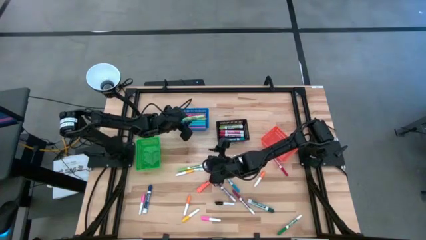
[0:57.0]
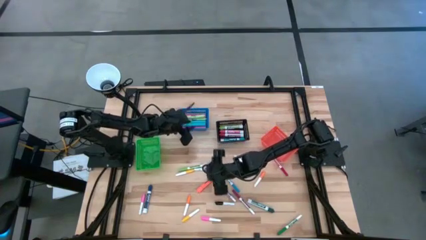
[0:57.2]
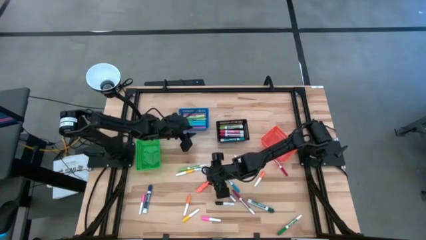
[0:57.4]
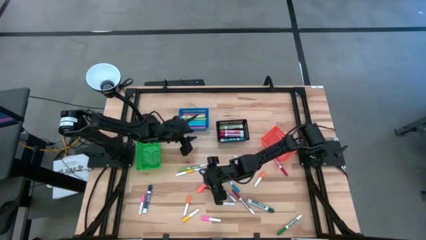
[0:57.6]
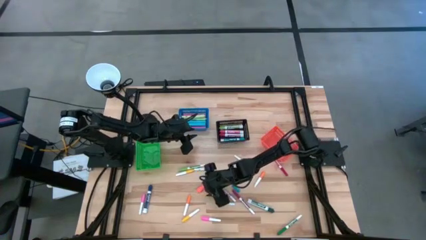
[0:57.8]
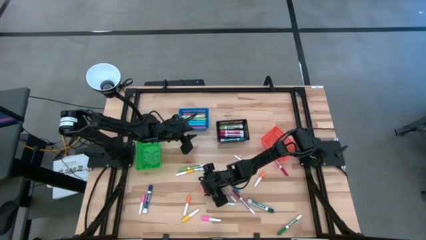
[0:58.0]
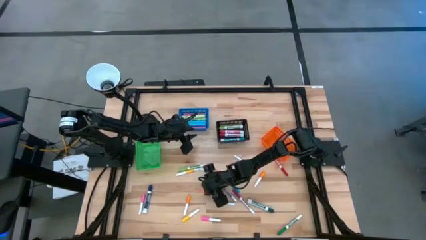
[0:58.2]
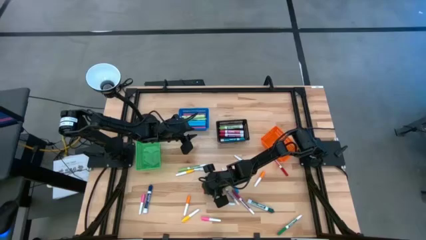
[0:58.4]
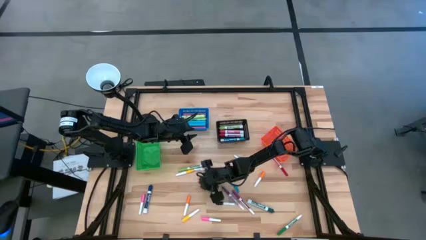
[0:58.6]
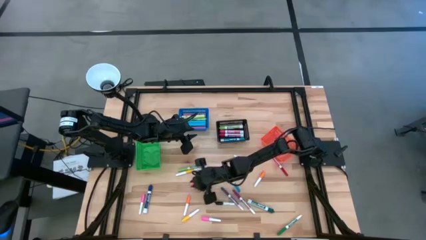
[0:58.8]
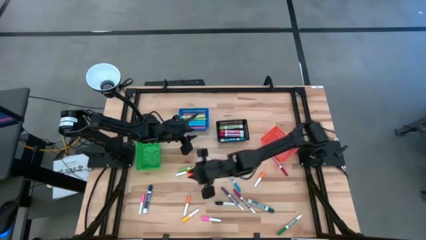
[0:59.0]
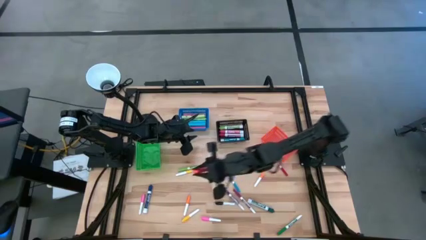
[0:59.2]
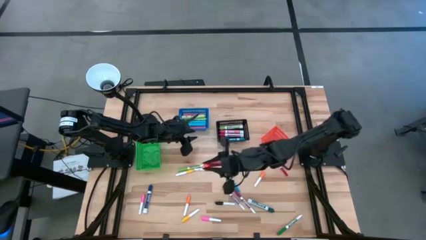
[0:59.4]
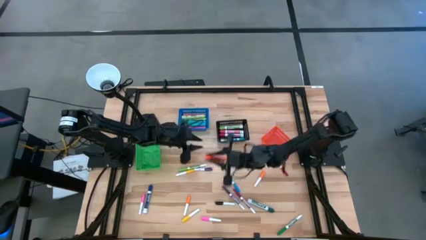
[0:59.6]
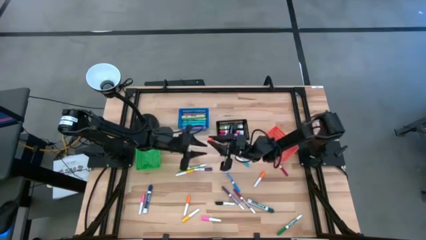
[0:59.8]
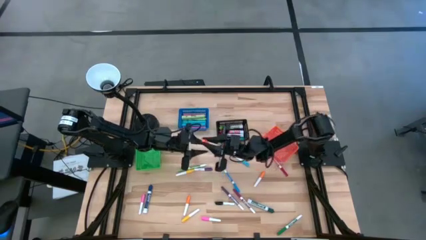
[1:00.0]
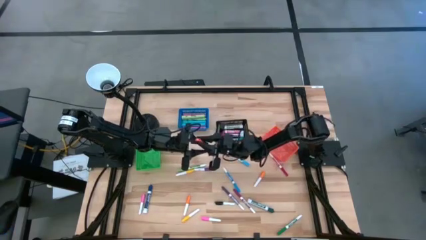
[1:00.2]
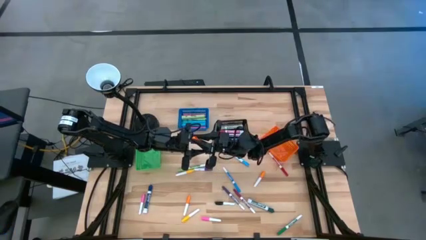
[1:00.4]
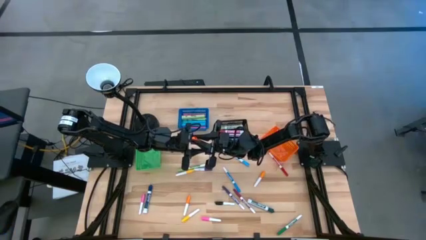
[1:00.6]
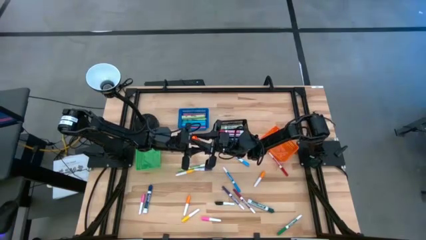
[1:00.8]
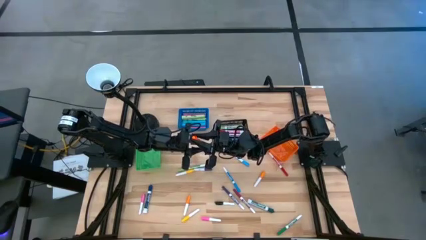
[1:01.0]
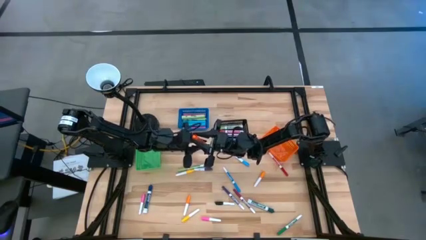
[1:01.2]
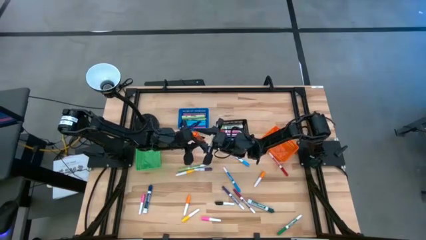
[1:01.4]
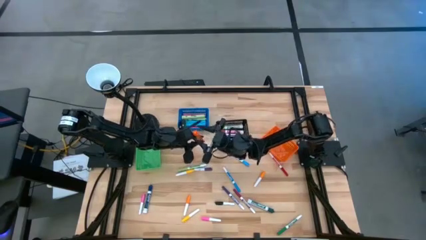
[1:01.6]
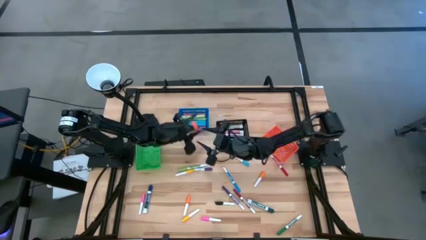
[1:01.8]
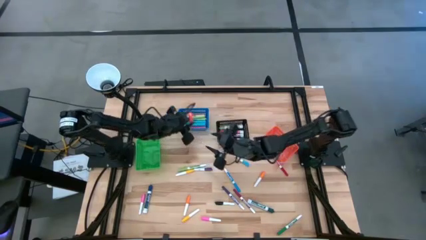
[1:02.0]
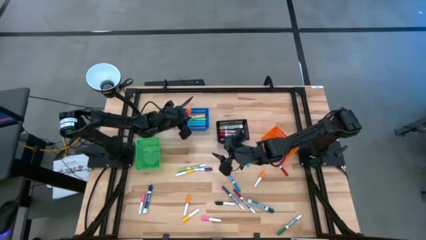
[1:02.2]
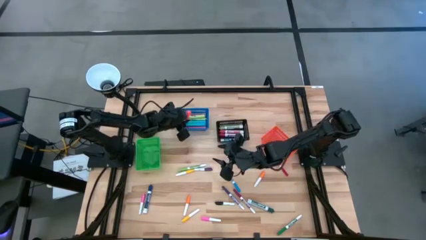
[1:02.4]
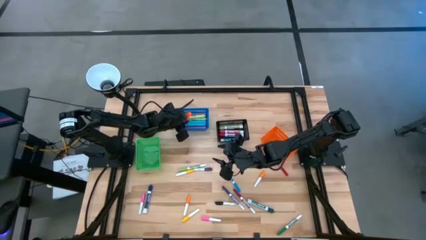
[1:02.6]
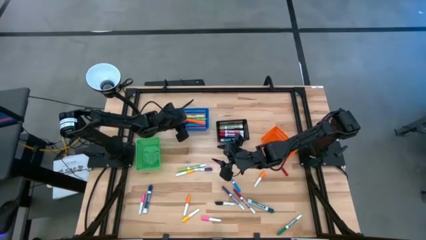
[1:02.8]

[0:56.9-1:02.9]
Task: Pick & Place Markers
Put the orange highlighter pen into the blue basket

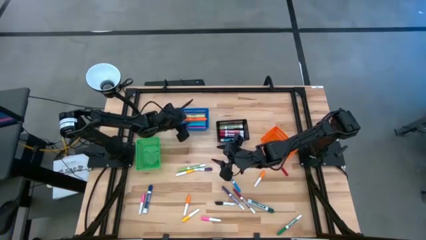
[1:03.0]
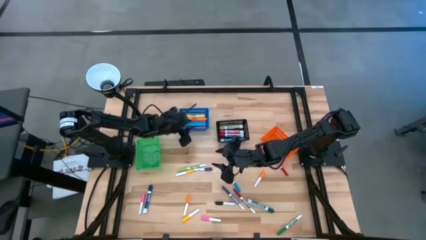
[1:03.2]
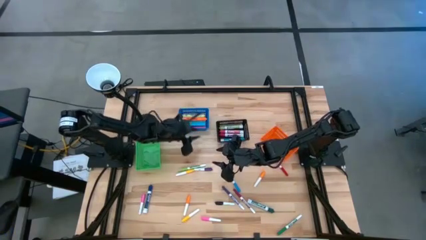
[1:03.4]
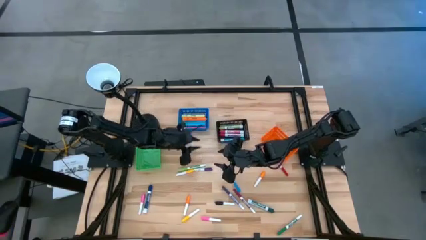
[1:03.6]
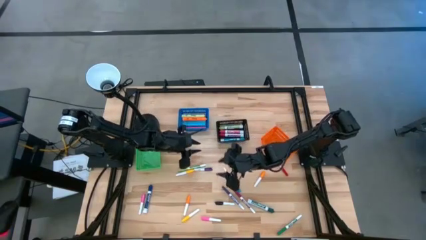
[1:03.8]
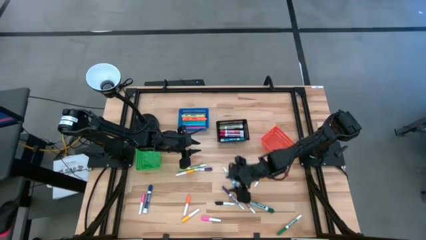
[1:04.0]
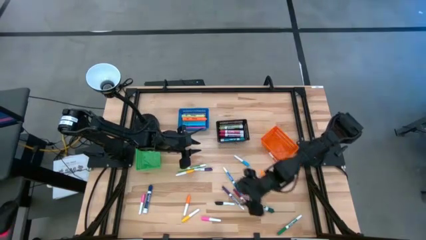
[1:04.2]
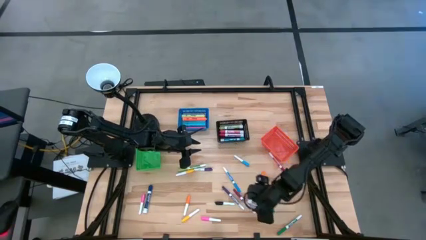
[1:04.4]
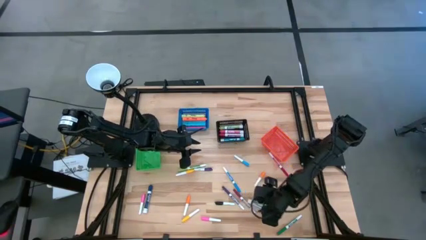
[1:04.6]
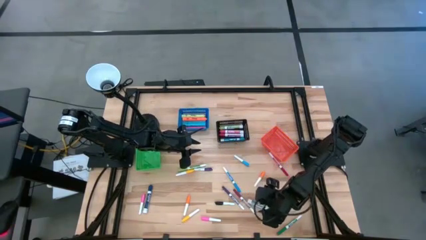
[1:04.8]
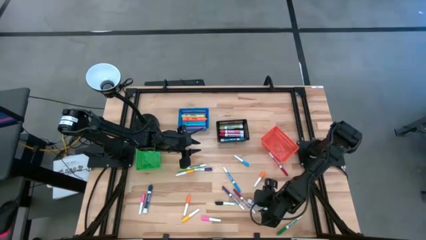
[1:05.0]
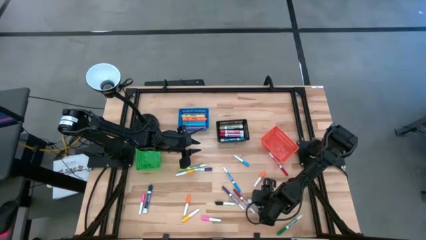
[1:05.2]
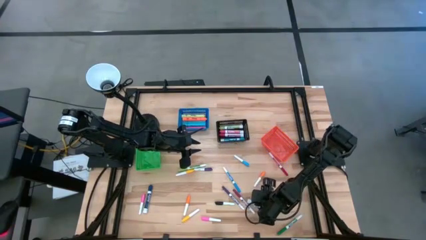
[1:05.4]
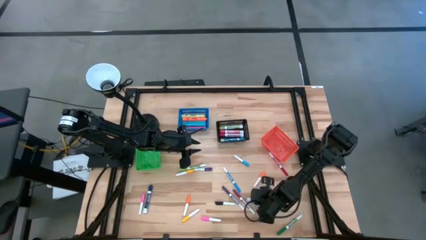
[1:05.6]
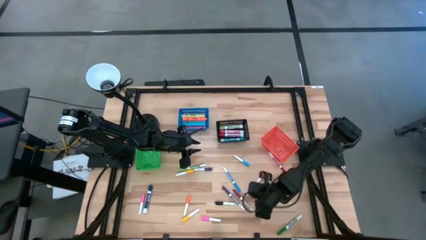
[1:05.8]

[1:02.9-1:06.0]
Put the green marker pen into the black basket

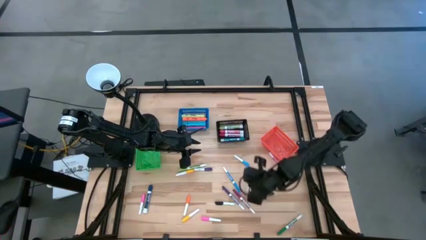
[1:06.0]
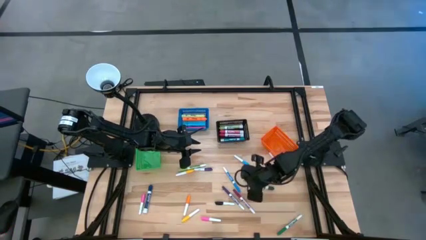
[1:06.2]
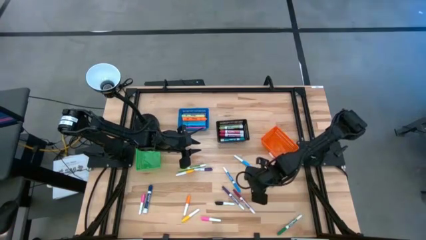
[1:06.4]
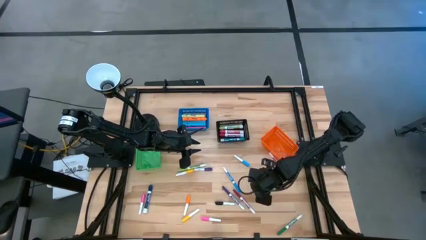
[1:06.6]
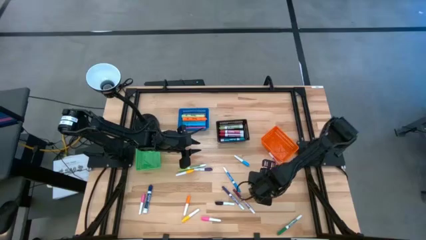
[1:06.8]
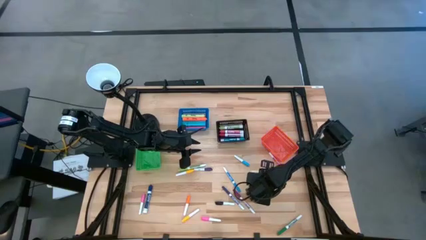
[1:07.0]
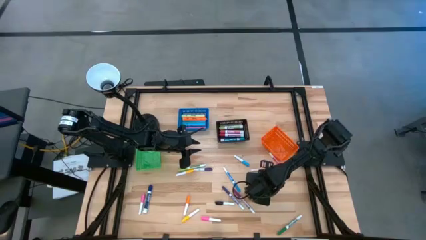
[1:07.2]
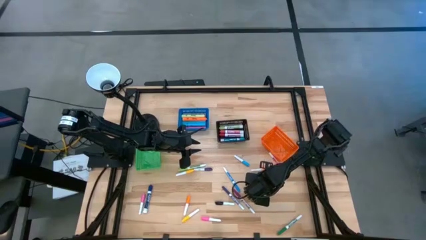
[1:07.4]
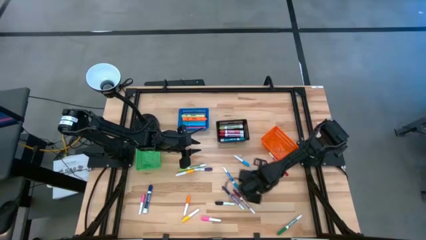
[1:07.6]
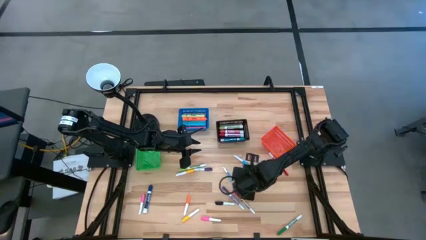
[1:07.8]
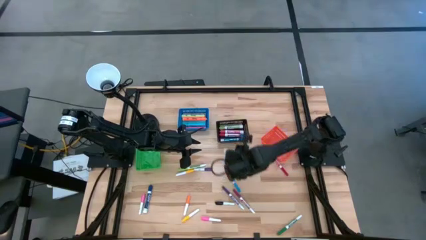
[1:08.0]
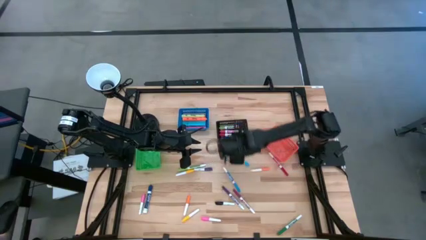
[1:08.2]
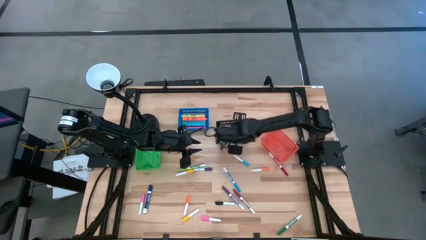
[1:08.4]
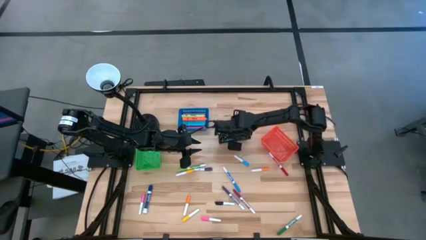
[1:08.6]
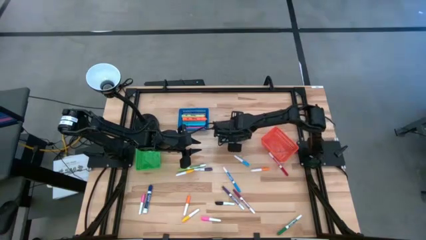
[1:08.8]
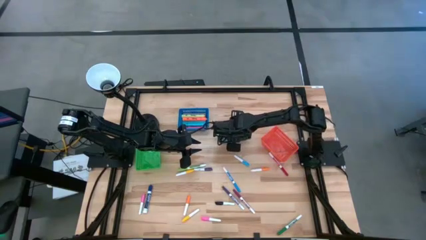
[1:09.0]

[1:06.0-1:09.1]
Put the dark green marker pen into the black basket

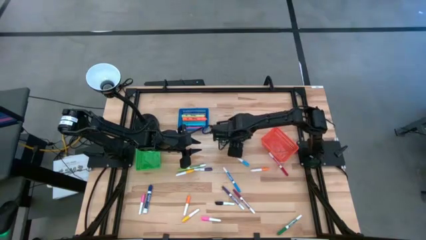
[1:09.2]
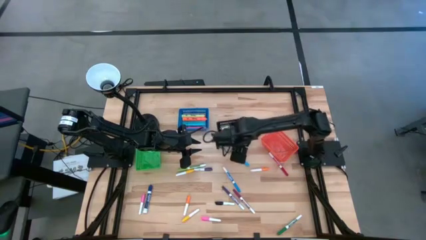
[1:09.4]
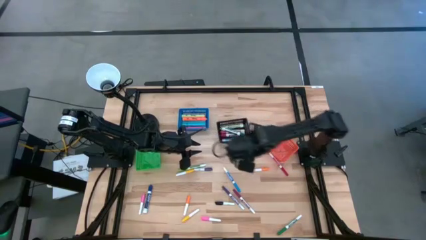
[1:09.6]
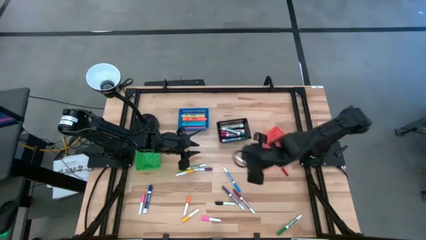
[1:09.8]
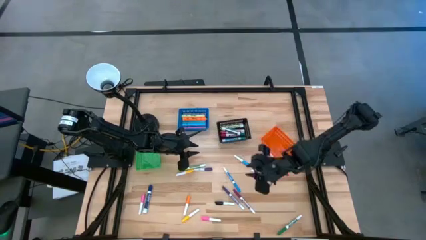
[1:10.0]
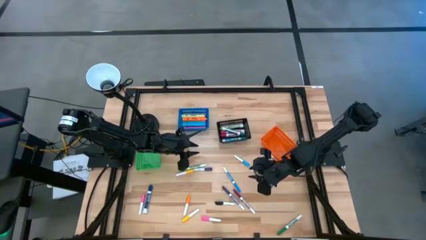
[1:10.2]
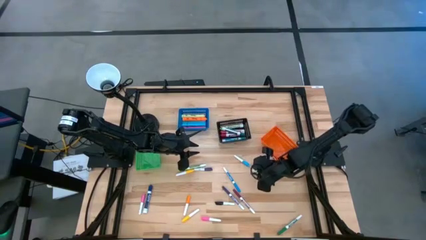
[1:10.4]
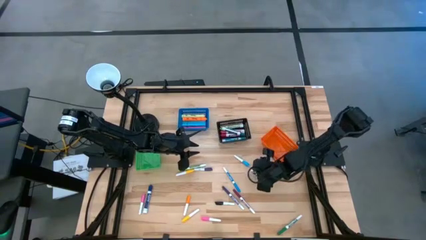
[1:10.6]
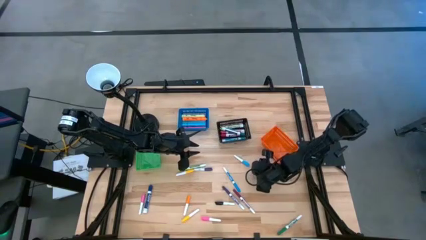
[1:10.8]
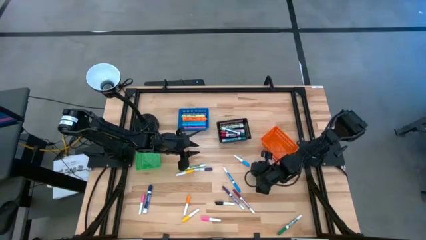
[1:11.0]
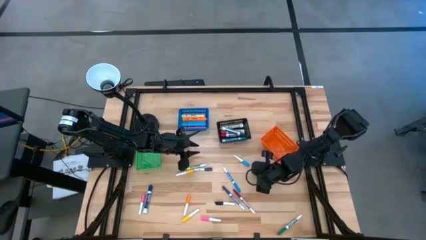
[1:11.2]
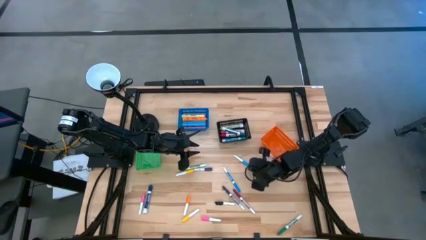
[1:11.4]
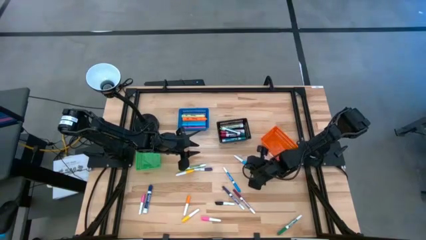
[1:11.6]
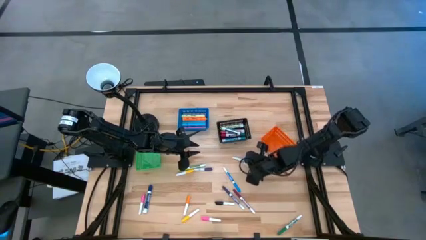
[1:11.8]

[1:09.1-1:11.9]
Put the right orange highlighter pen into the green basket

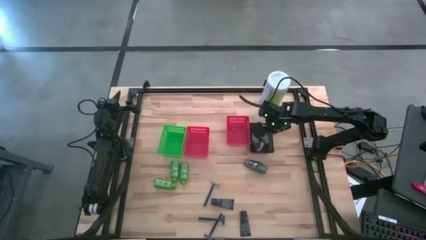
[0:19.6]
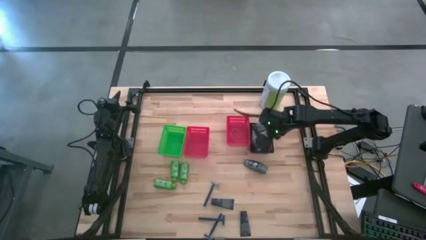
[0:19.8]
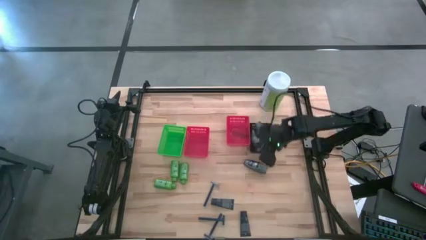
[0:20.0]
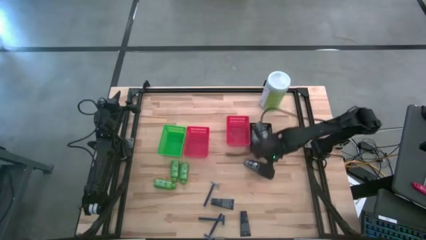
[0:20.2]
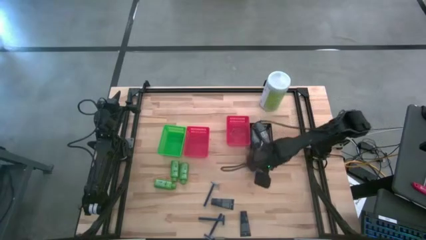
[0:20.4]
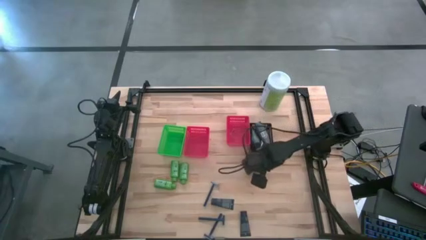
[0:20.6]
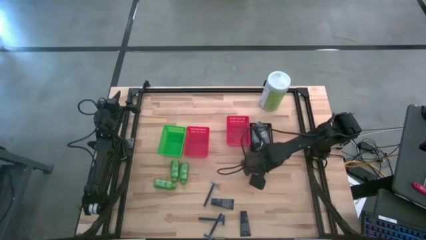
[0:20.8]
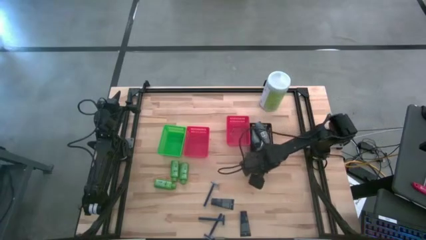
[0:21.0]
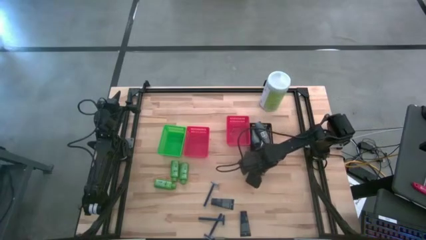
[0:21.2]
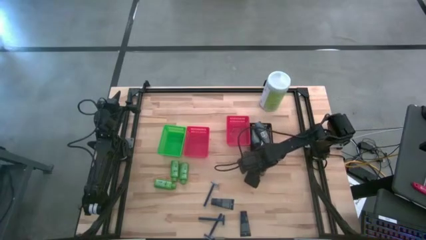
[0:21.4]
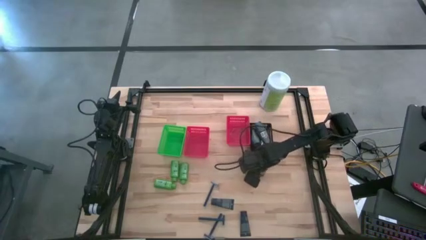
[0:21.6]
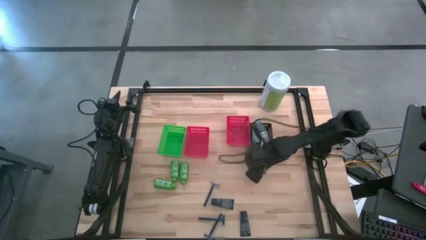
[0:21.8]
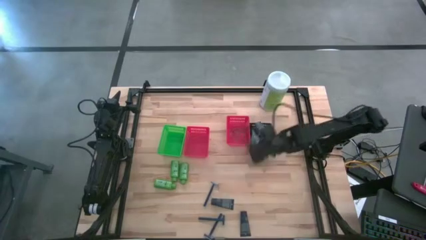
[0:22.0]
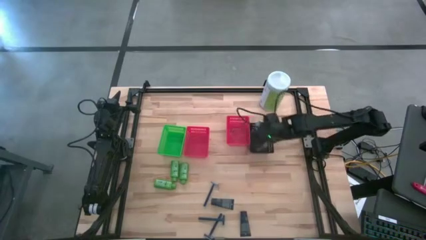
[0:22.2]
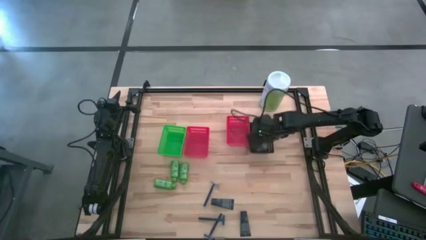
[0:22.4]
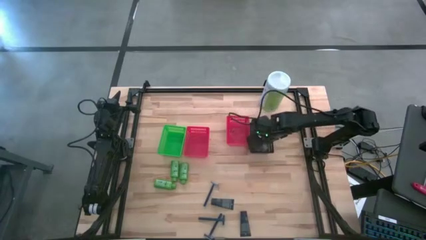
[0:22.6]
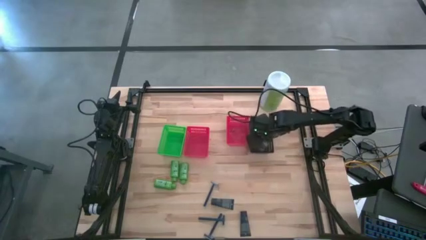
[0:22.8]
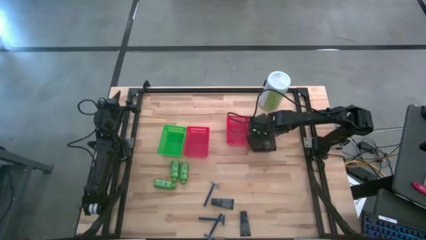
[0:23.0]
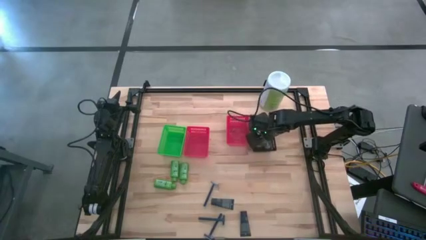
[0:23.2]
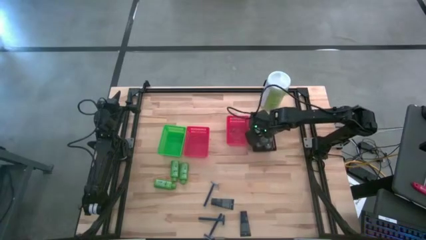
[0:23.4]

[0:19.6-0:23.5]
Task: Pick & Place Travel size toiletries
Put the gray deodorant into the black basket
